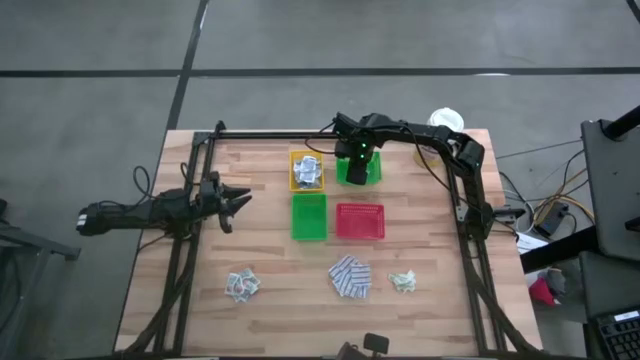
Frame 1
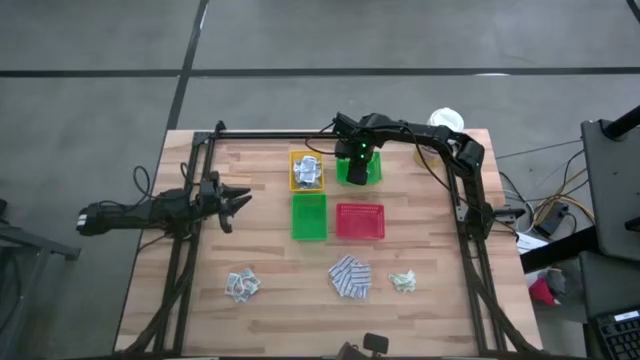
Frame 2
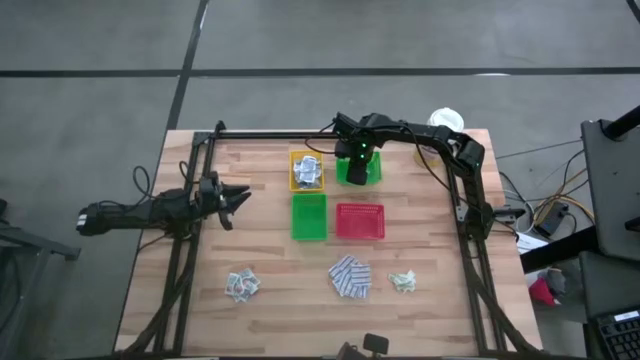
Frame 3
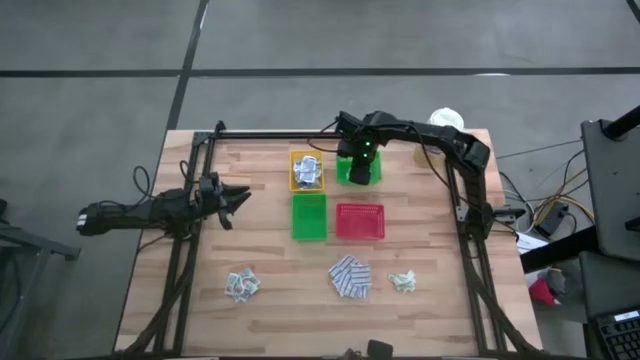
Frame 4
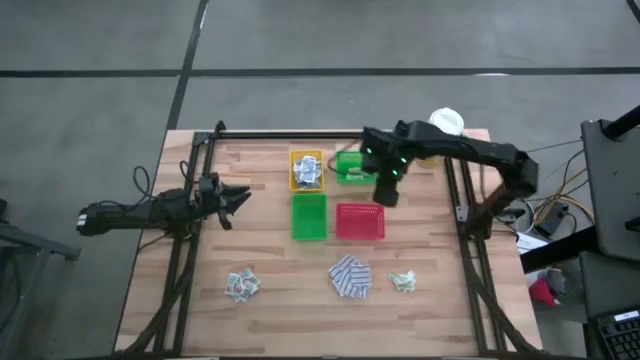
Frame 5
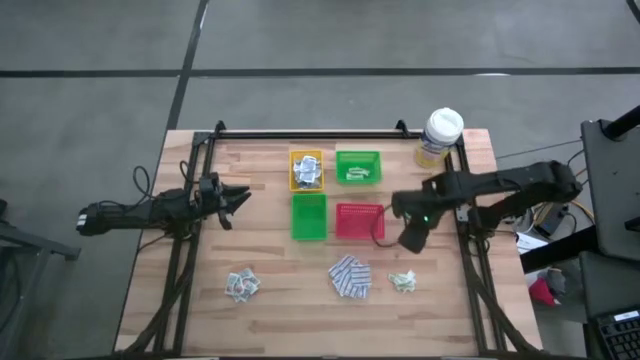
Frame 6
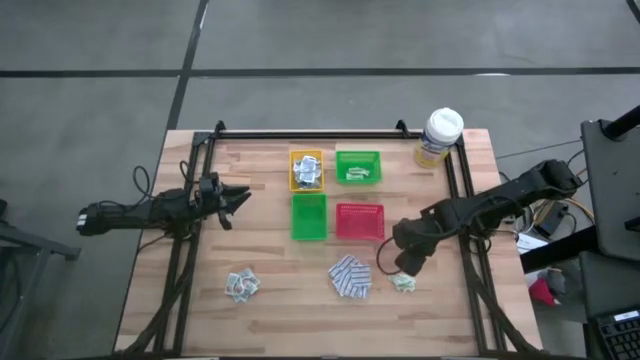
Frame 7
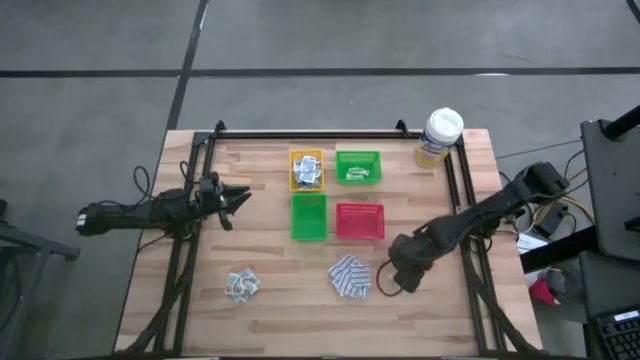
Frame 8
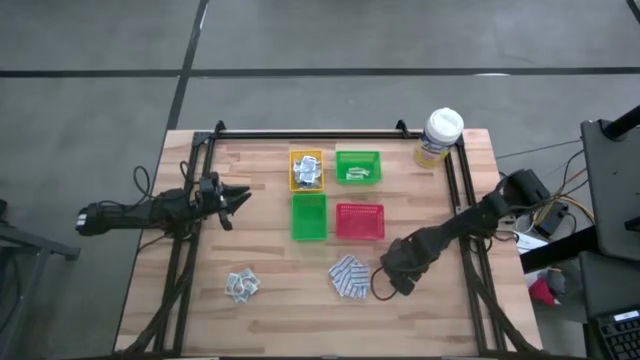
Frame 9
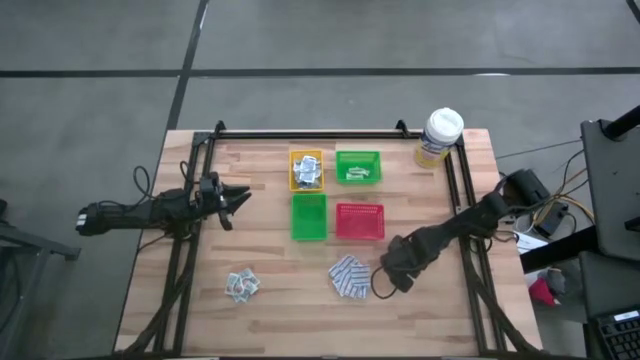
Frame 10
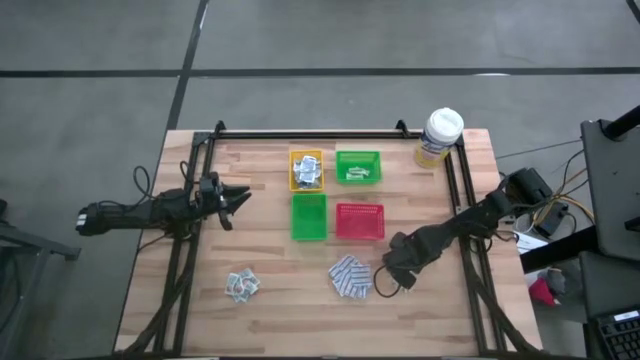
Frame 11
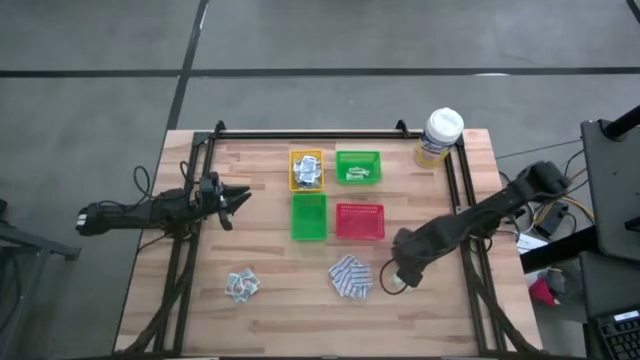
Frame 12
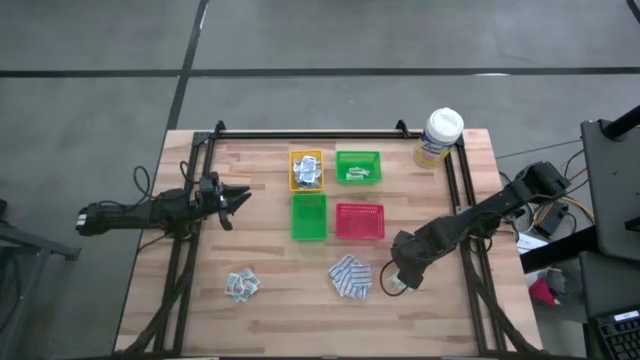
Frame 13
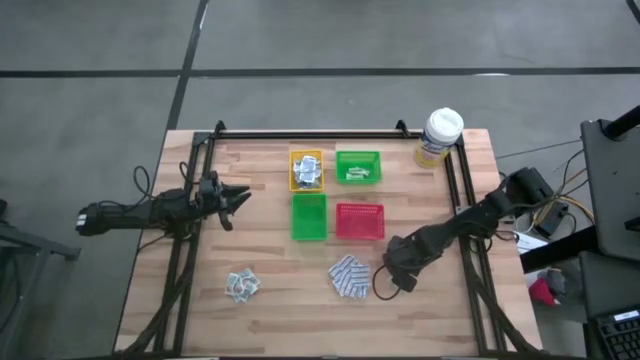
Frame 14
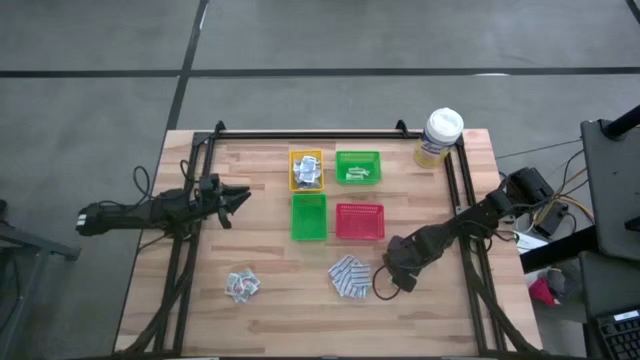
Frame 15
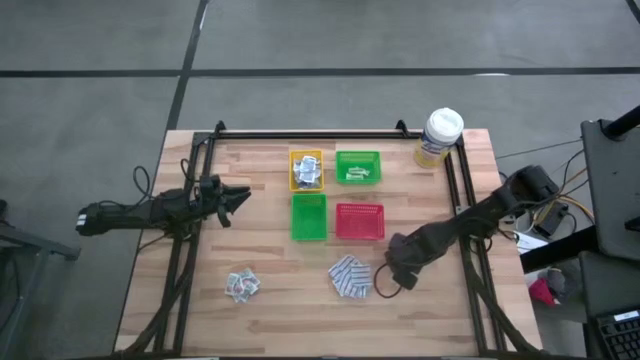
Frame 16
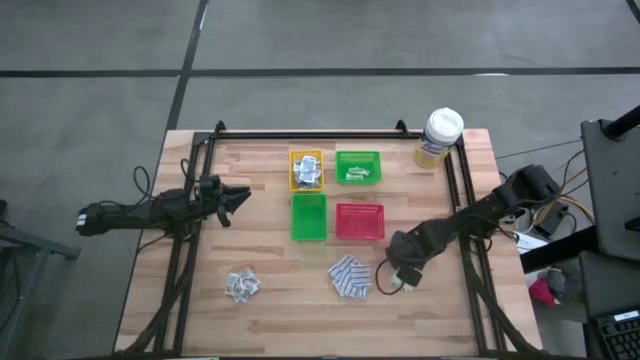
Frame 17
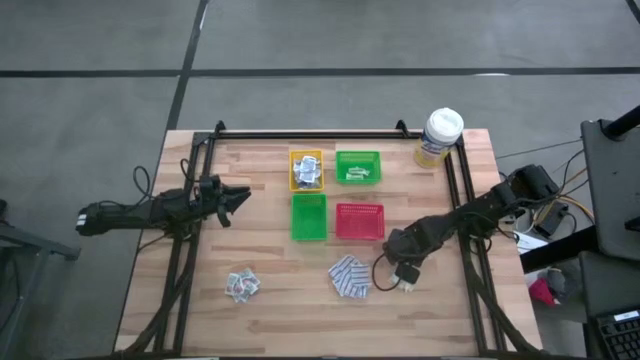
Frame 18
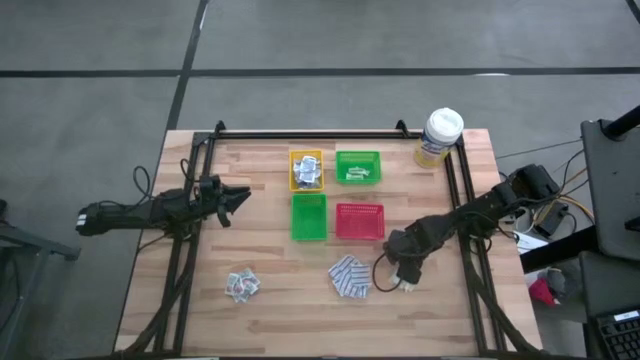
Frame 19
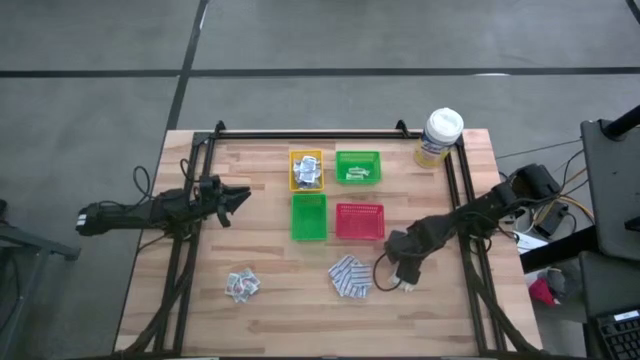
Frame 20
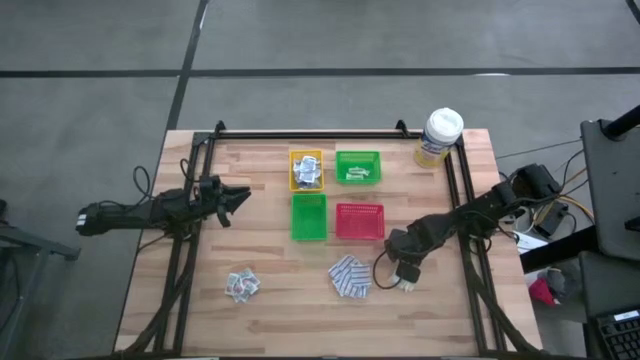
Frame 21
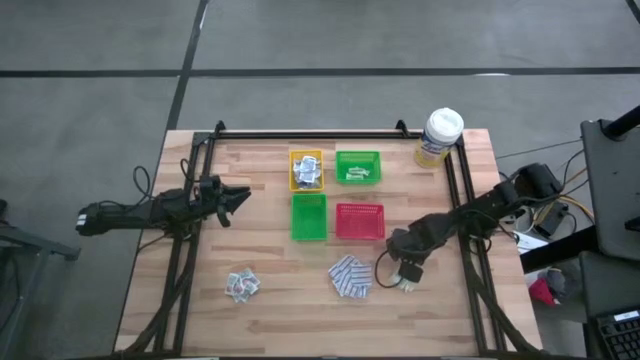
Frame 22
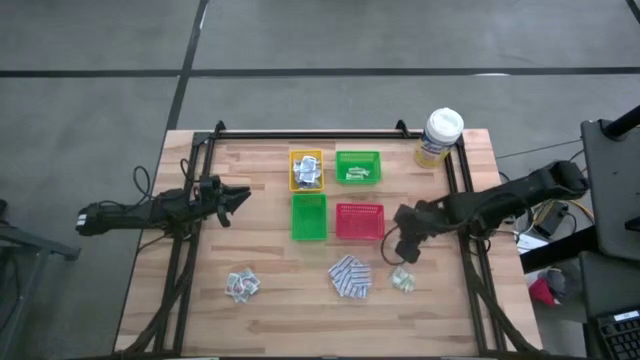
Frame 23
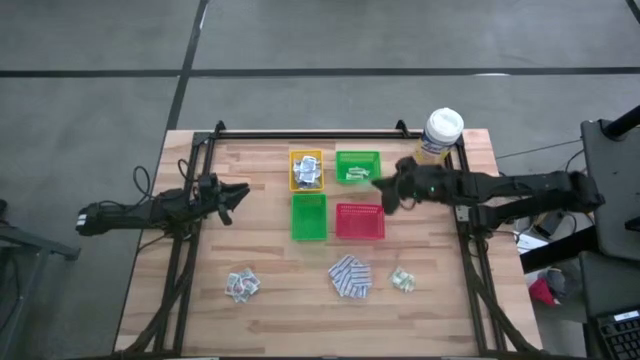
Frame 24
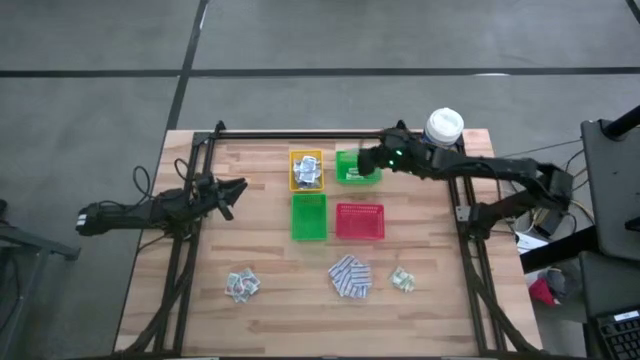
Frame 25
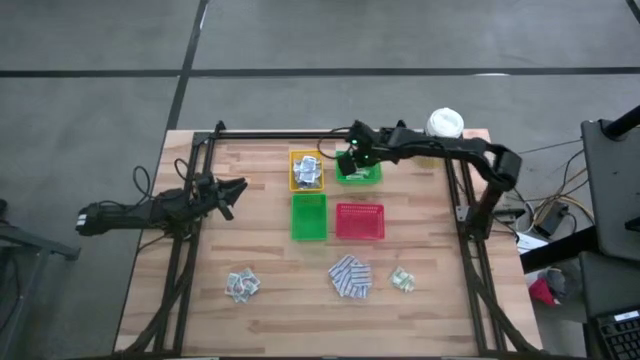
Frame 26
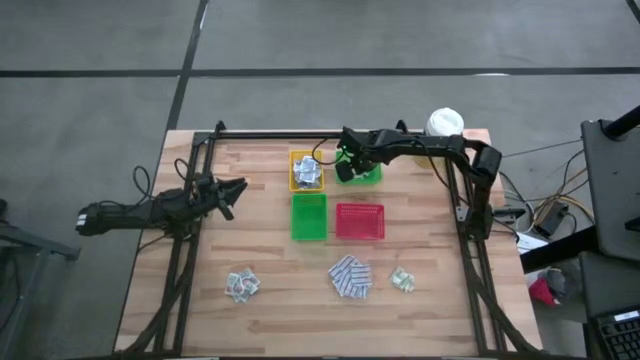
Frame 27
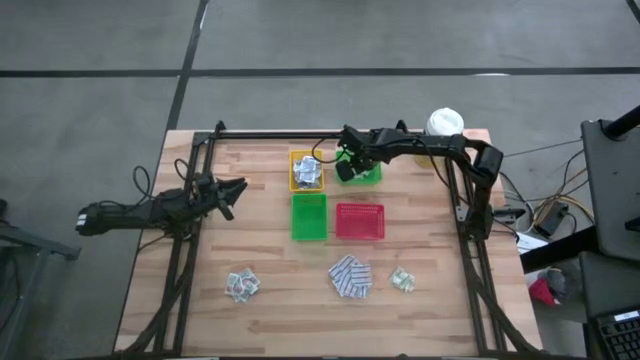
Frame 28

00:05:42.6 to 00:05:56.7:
Task: Pick & Place First Aid Supplies
Put the green bandage pack into the top green bin

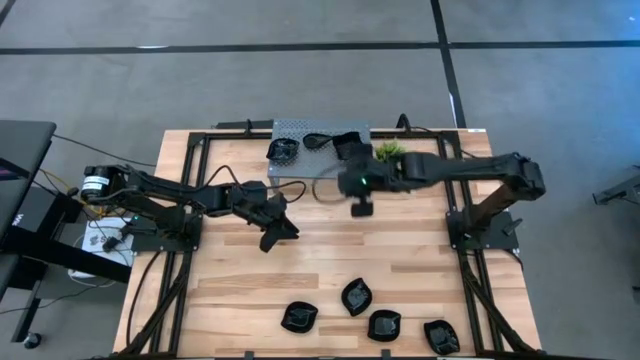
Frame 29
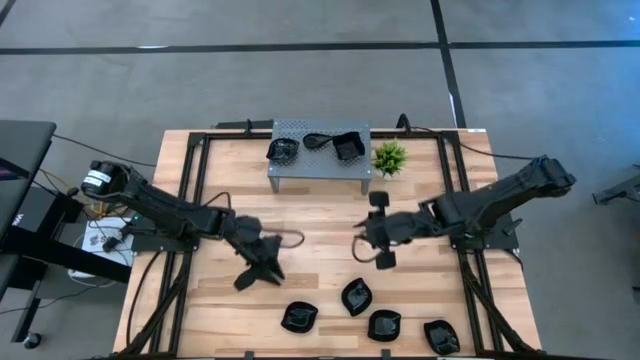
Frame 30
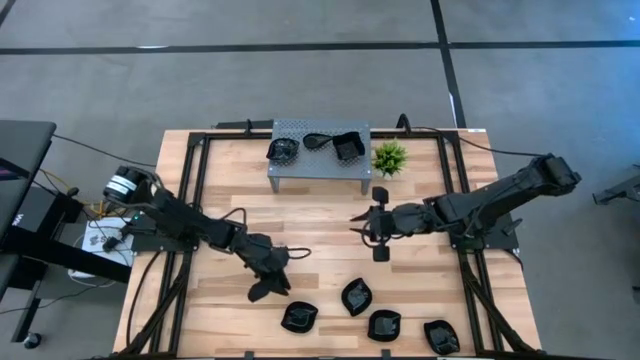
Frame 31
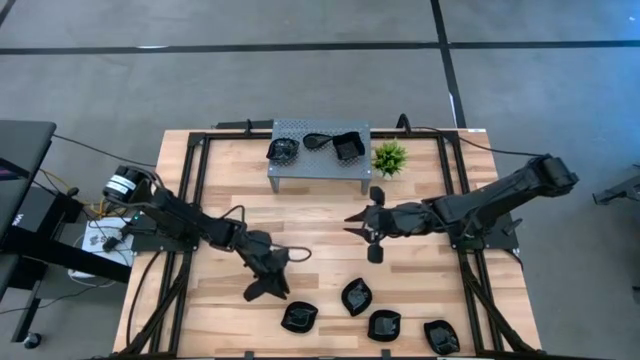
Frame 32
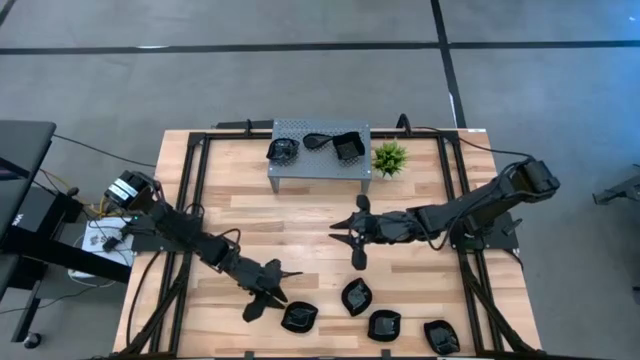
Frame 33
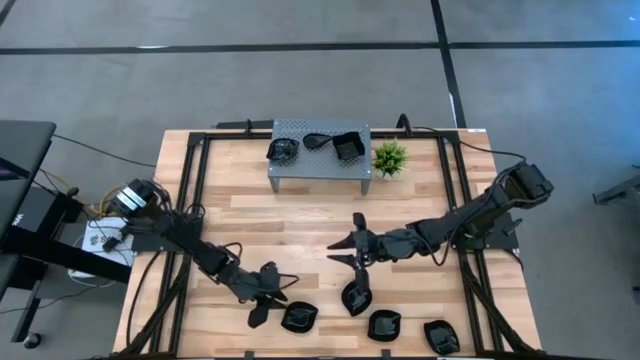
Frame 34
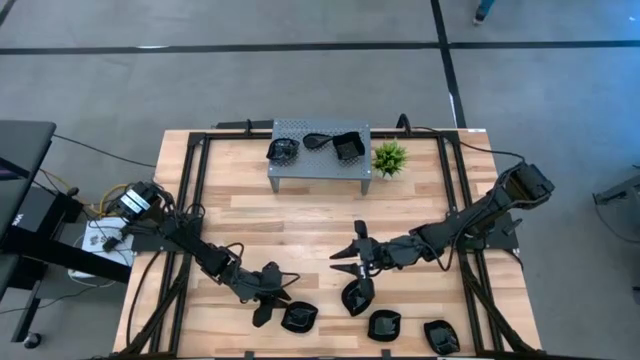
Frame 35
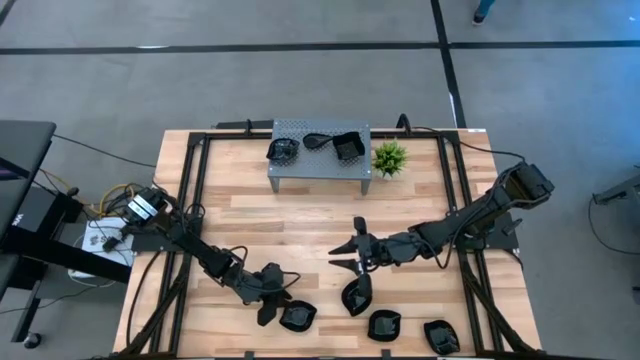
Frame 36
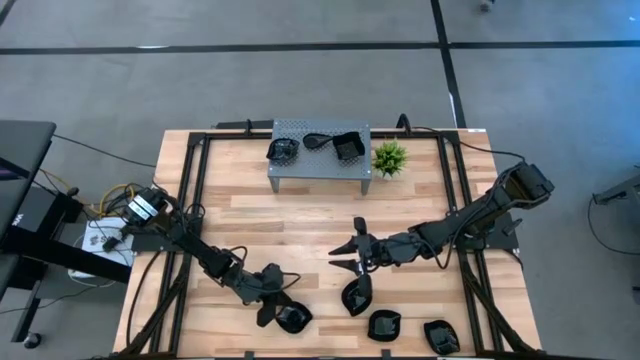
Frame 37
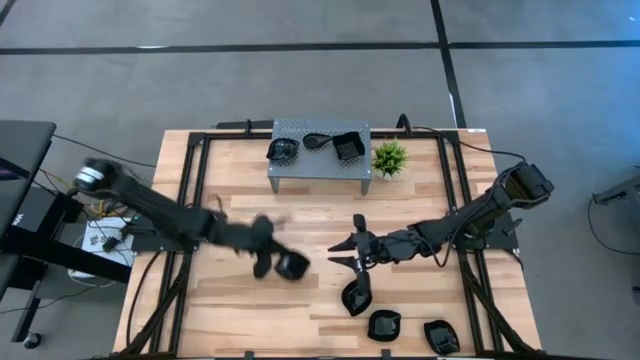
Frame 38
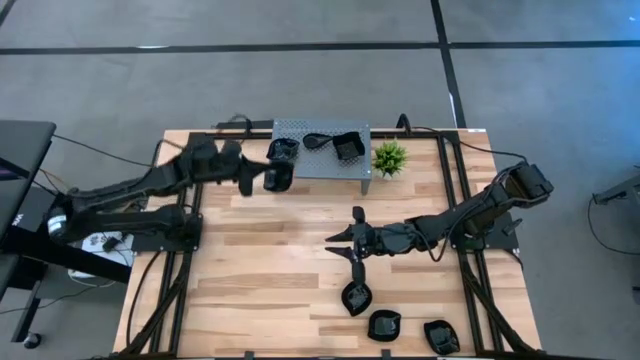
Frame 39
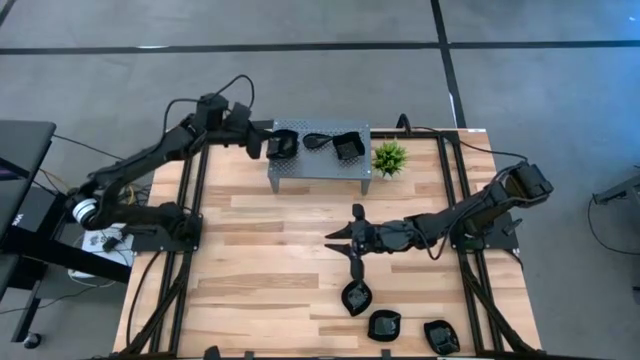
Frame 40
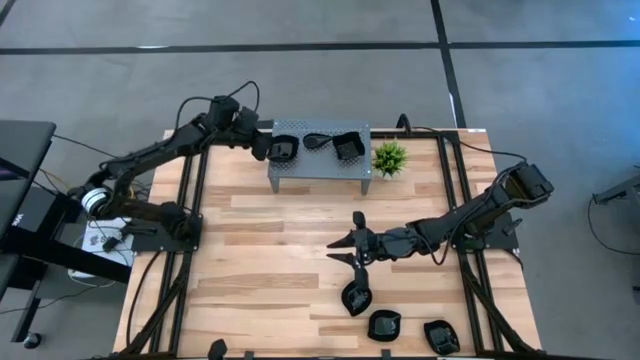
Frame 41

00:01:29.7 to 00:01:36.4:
Task: Pick & Place Mini shaped plates
Stack the leaf-shaped plate on top of the leaf-shaped plate on the shelf
